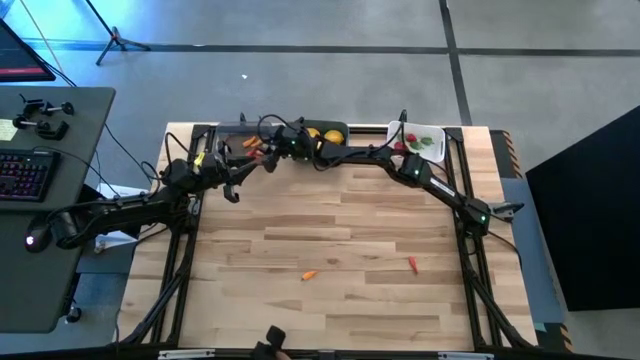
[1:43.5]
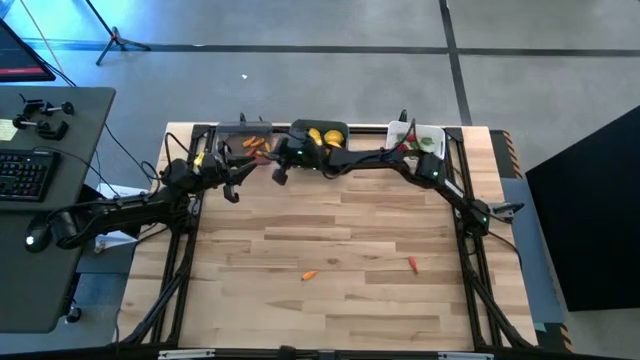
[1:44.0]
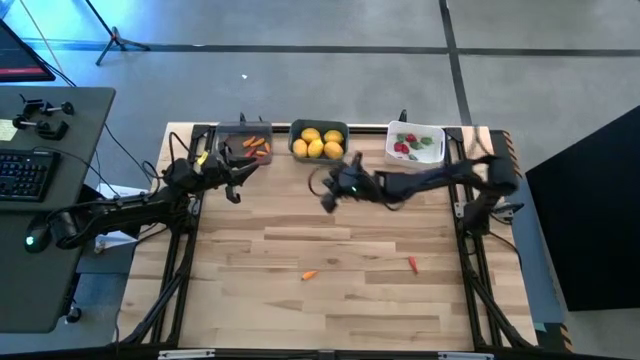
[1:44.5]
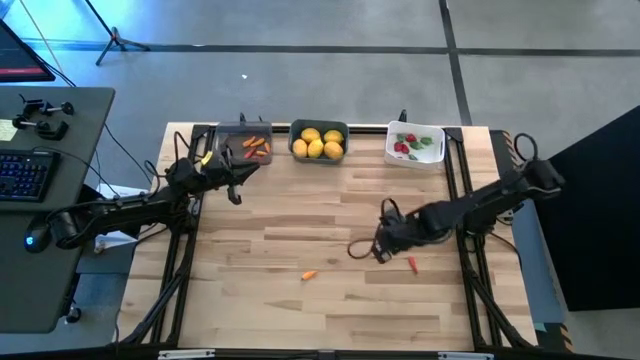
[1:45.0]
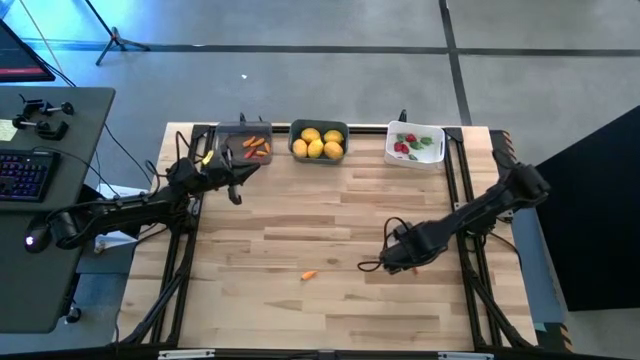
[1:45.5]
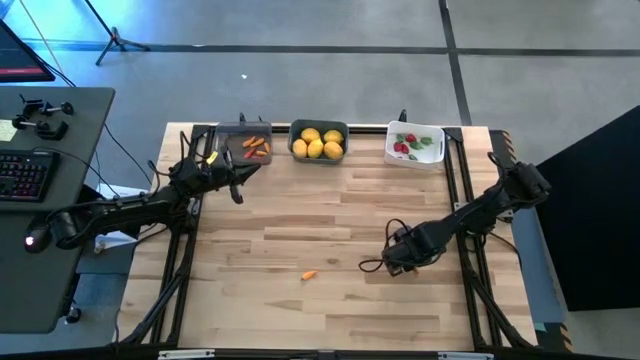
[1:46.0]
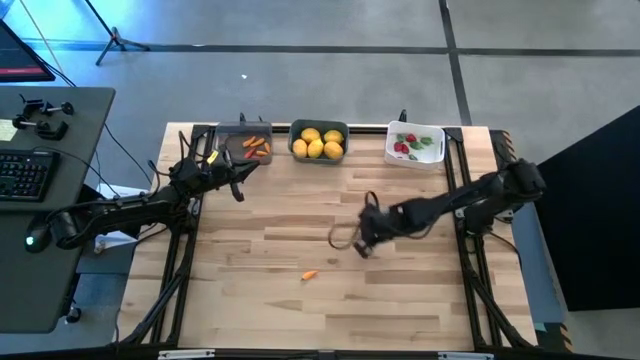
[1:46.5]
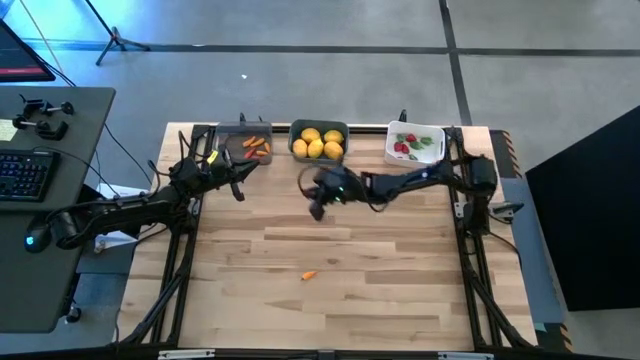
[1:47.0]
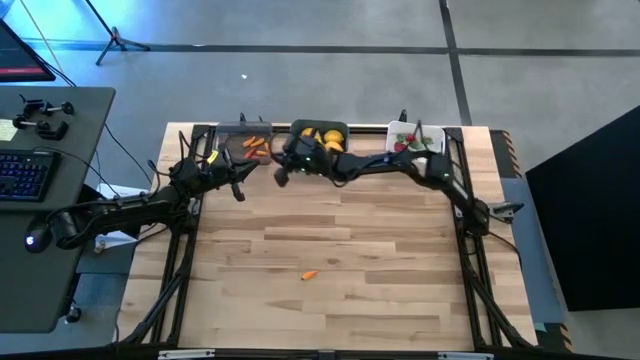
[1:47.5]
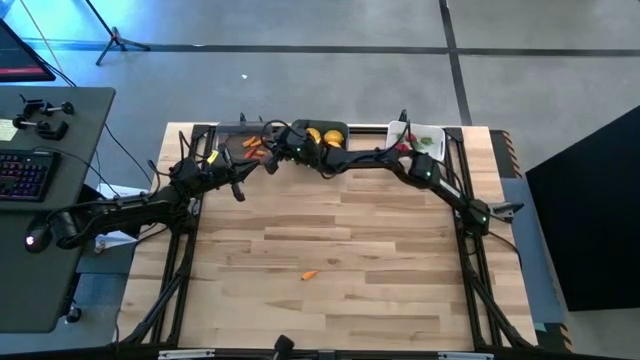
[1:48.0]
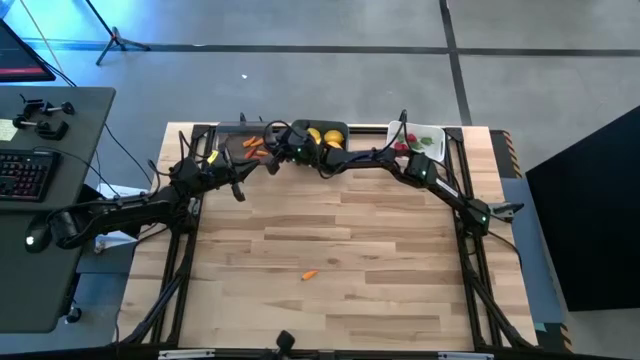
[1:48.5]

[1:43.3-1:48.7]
Task: Sort produce into baskets
Put the orange chili pepper into the transparent black bin

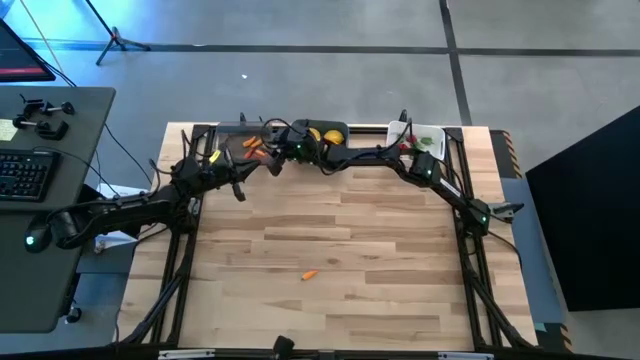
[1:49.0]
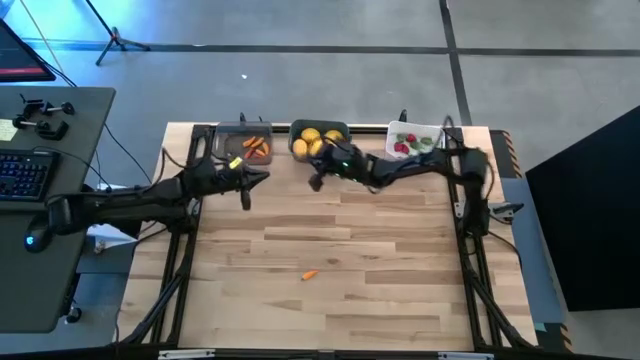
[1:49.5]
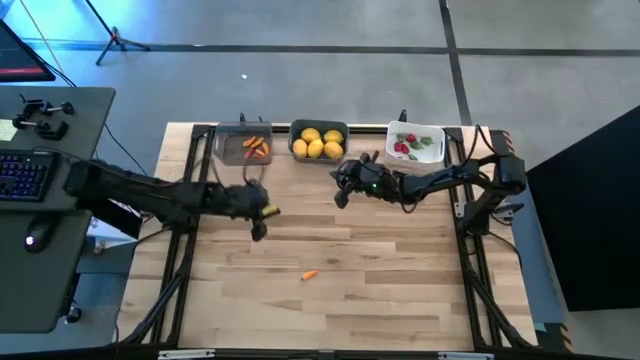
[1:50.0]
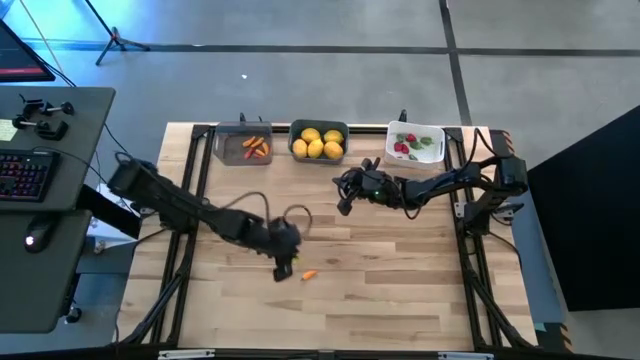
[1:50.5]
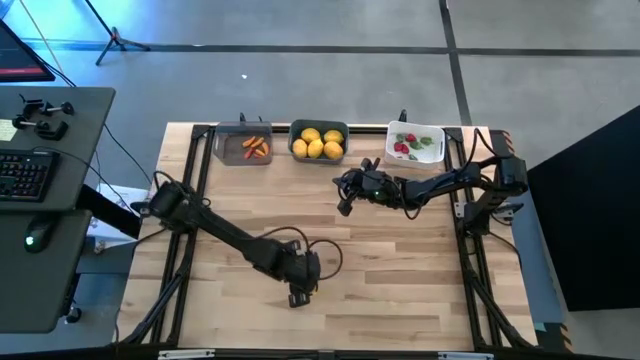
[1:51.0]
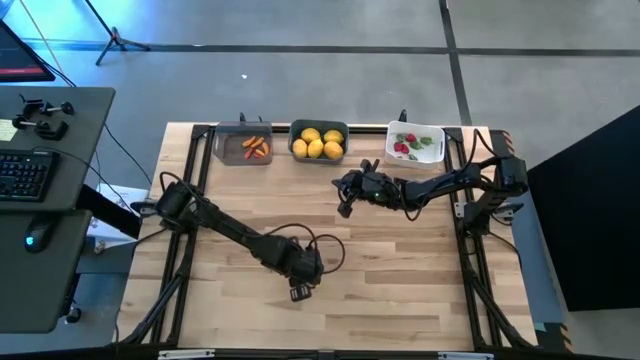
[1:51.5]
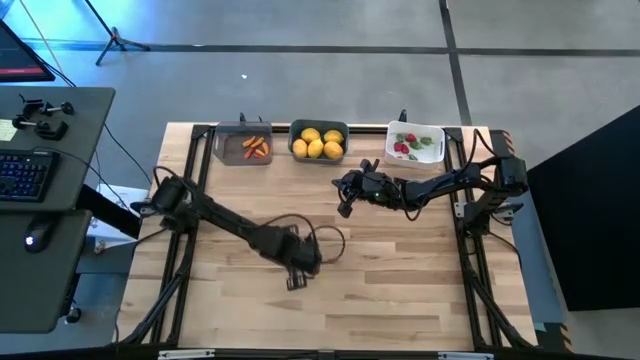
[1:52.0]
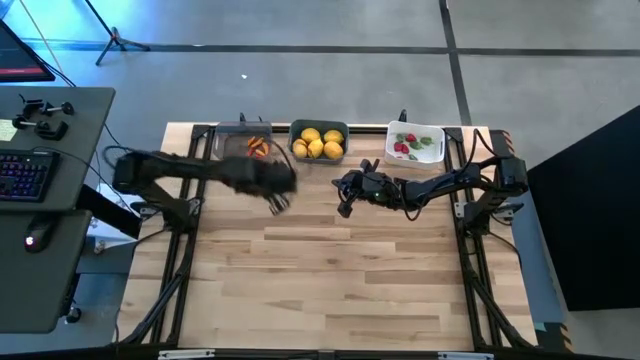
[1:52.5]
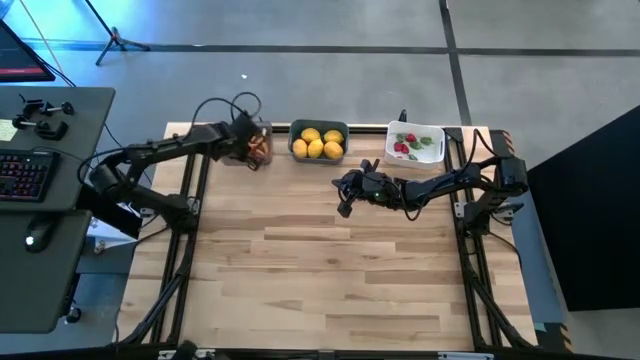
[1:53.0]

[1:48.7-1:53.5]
Put the yellow chili pepper into the transparent black bin

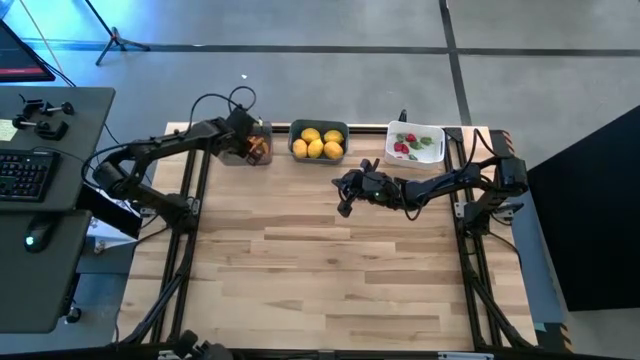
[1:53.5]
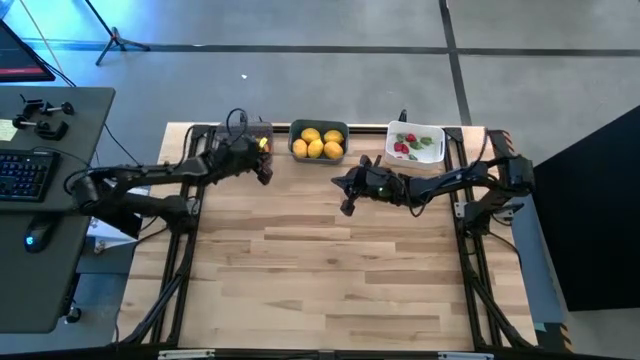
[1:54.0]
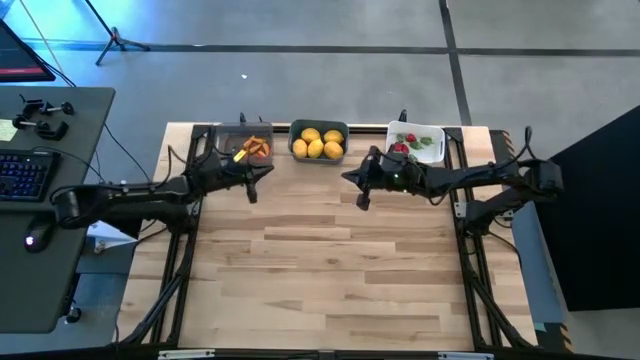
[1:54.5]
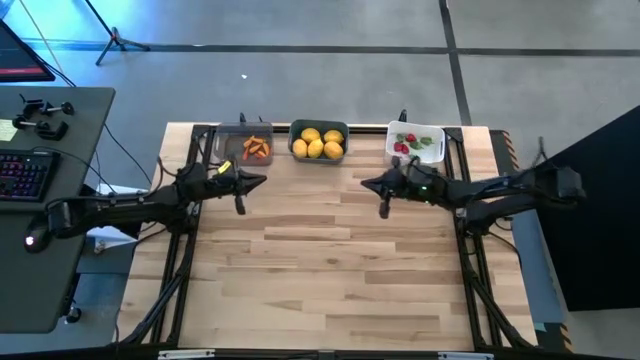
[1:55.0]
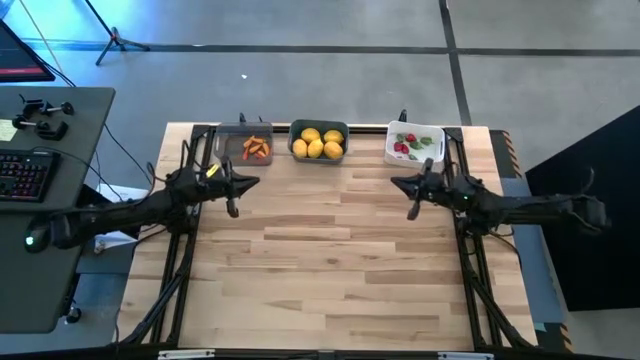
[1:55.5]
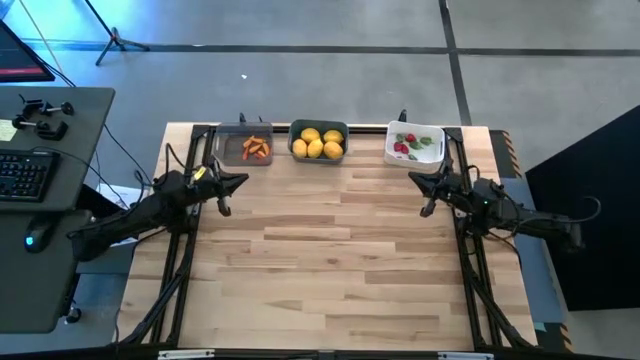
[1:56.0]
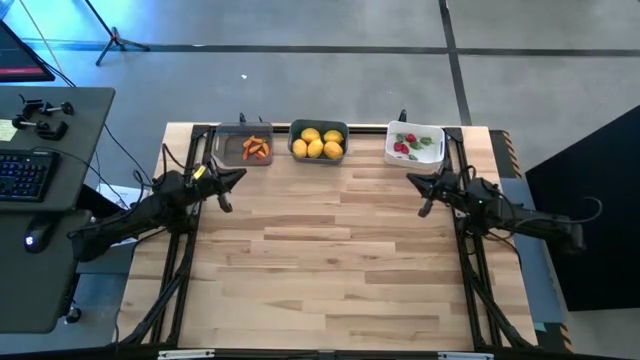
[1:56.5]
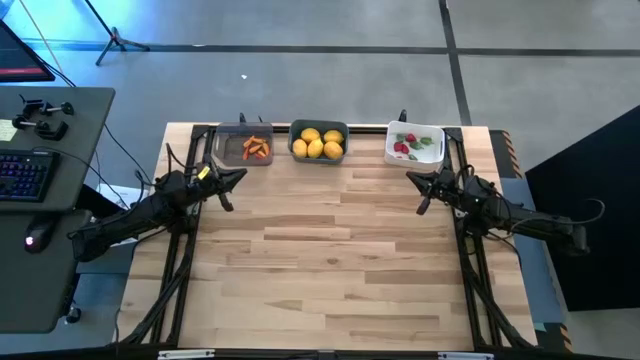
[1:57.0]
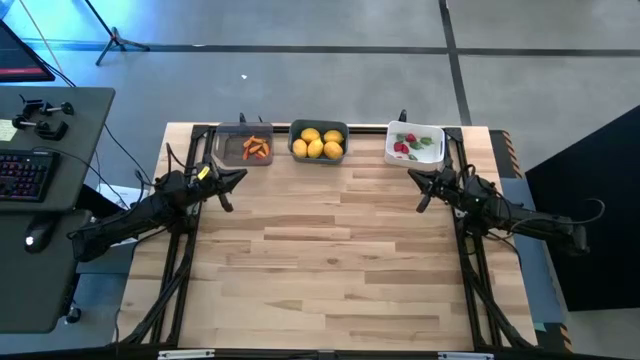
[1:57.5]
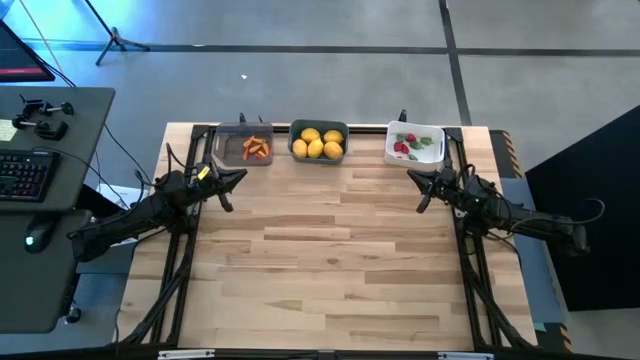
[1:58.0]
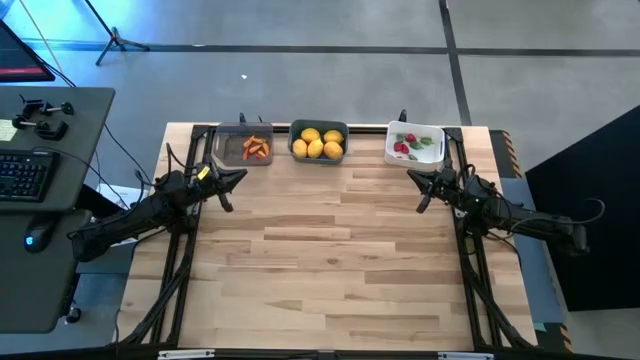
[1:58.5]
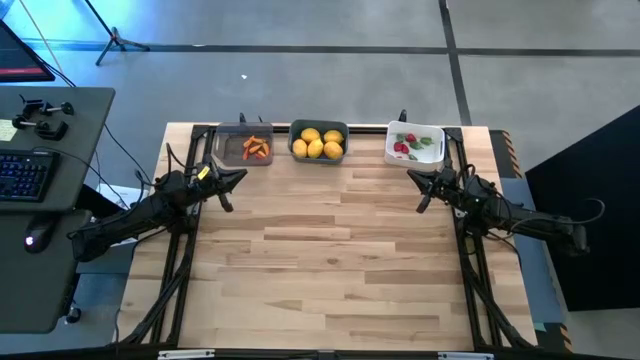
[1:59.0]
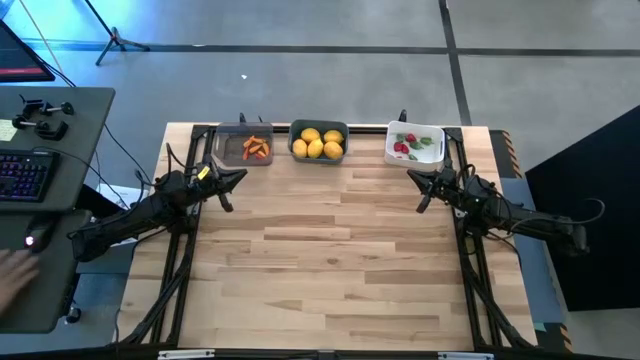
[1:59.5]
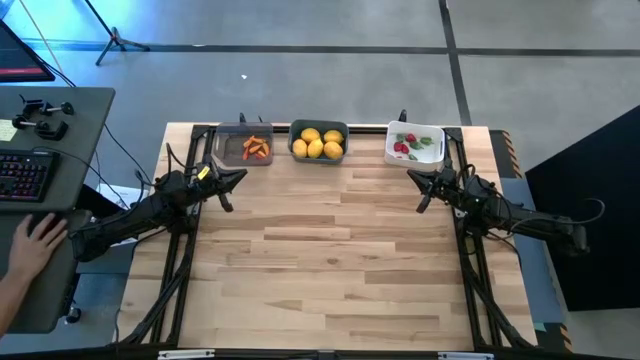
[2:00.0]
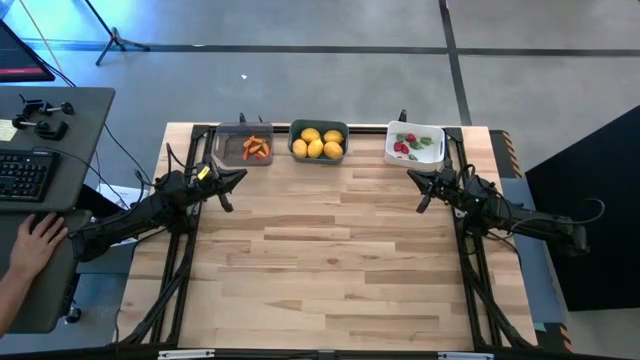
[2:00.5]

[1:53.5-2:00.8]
Return to Home Position

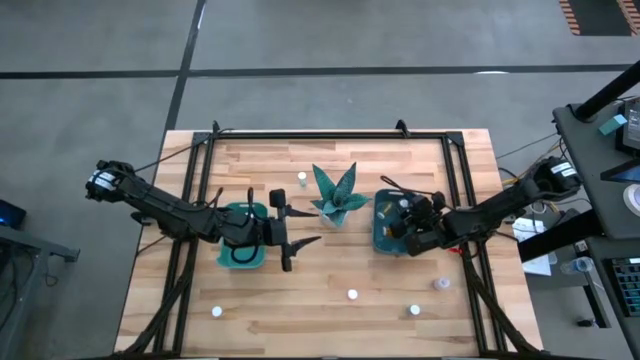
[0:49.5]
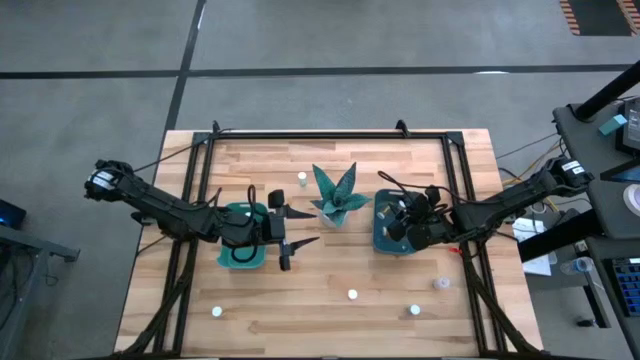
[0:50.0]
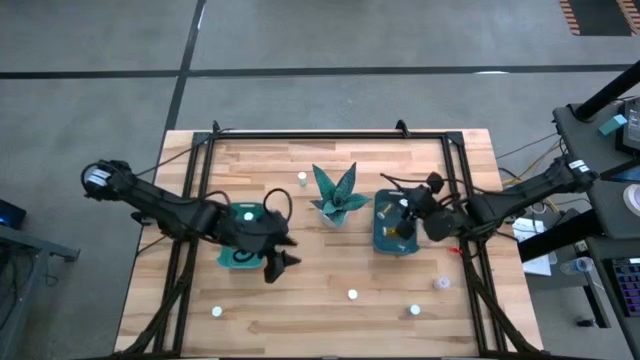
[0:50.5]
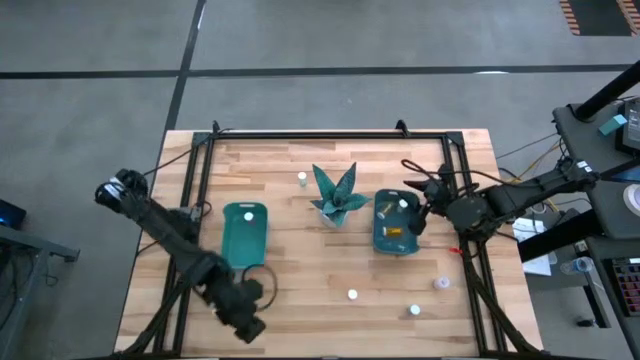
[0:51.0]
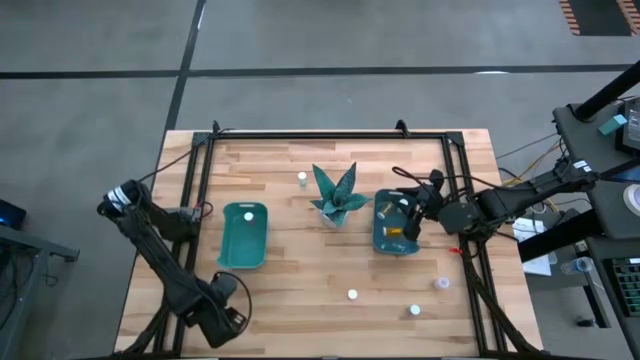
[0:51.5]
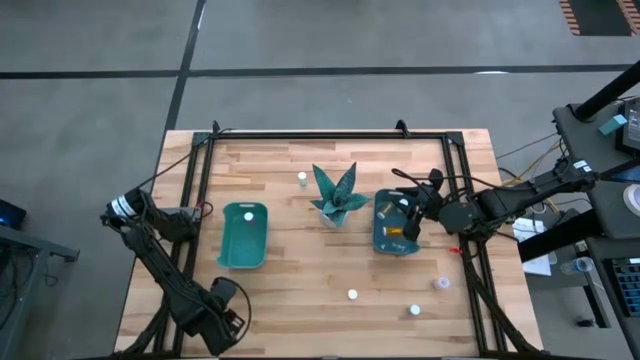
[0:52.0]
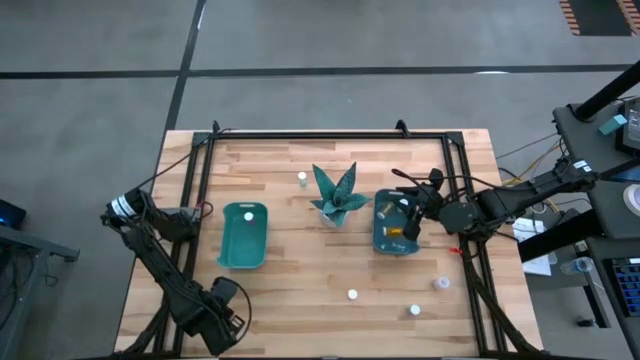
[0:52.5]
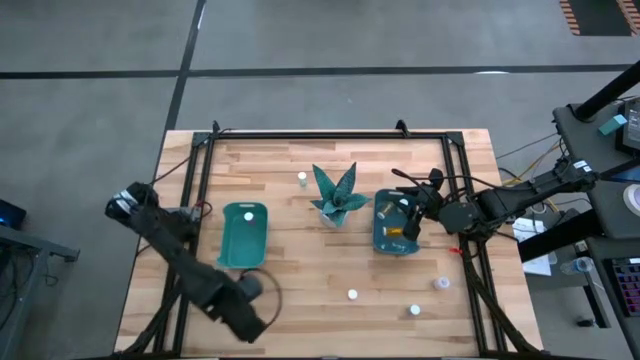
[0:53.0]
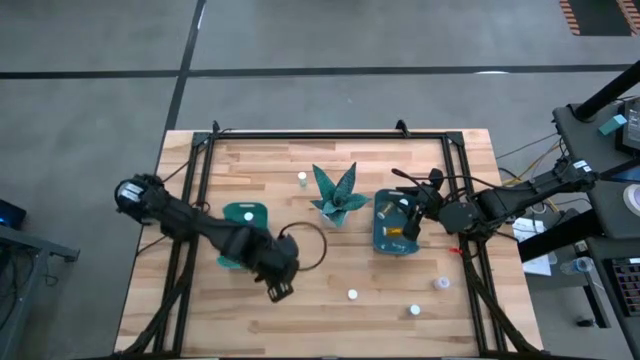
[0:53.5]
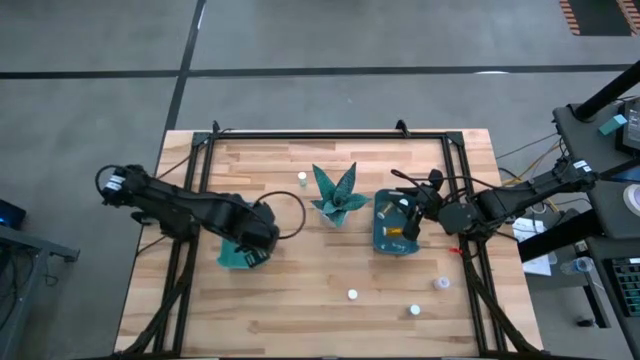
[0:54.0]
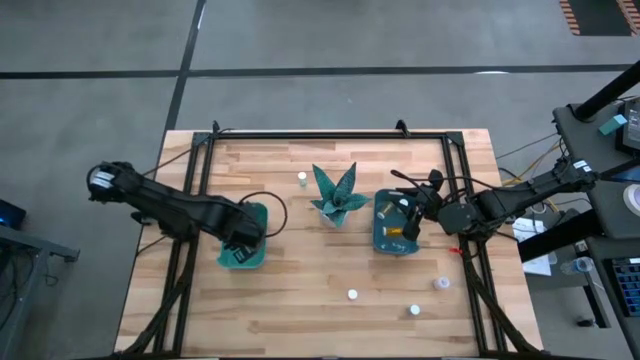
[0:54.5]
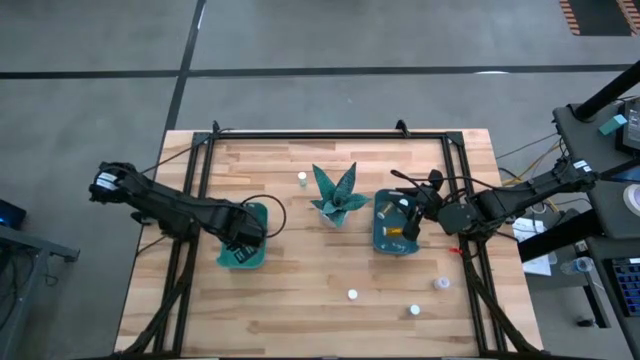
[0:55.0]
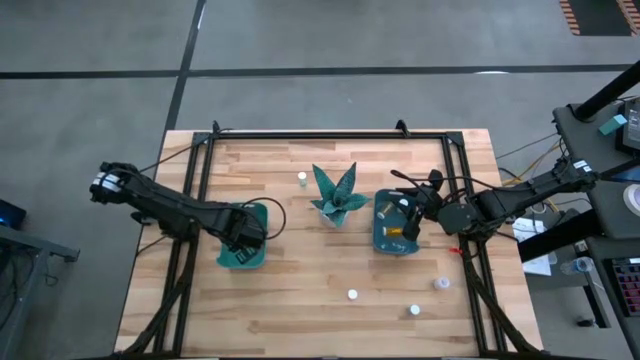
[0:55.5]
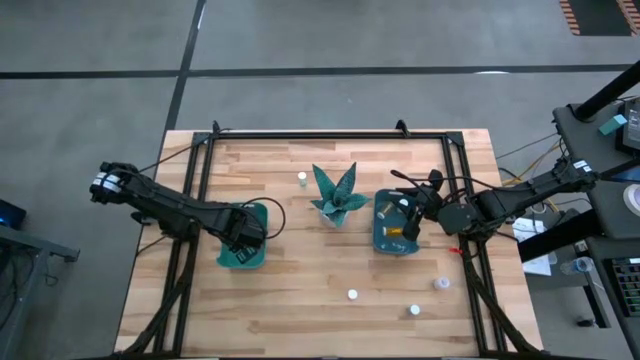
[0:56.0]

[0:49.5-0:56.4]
Task: Pick and place medicine bottles into bin by pill shape (circle, oval)
Put the yellow capsule bottle into the green bin
